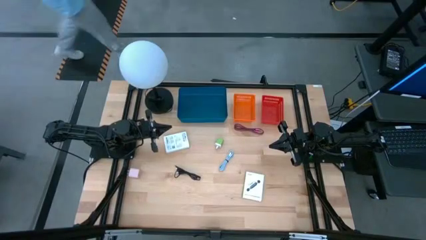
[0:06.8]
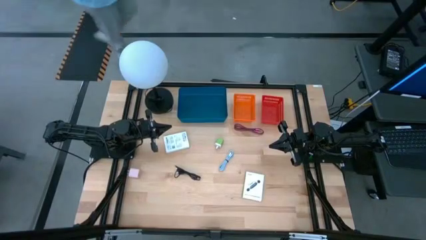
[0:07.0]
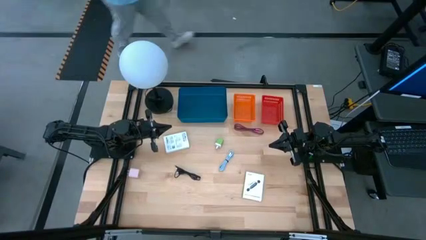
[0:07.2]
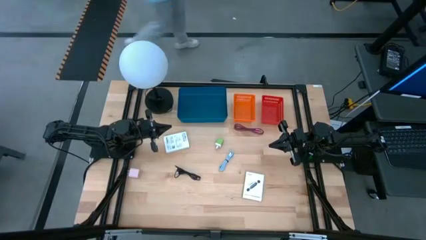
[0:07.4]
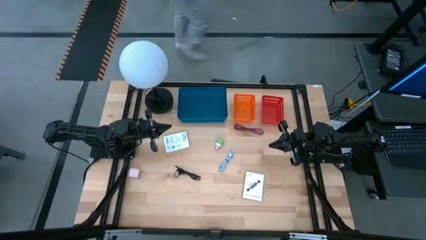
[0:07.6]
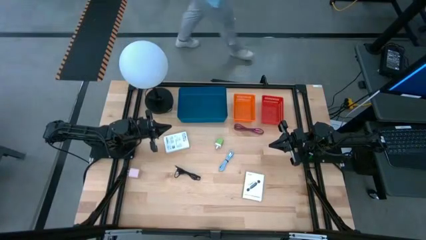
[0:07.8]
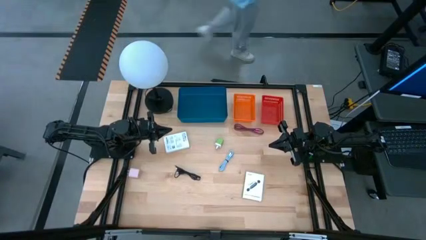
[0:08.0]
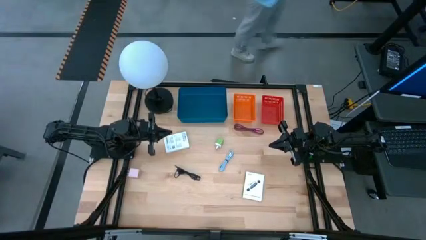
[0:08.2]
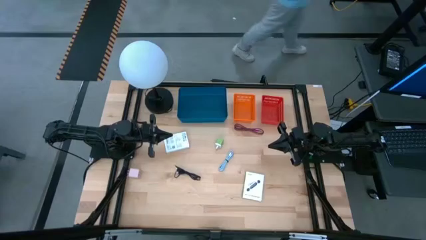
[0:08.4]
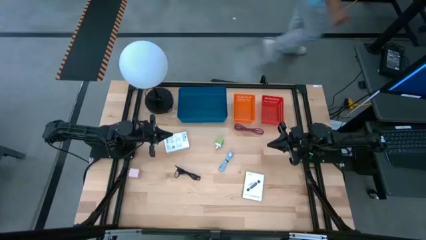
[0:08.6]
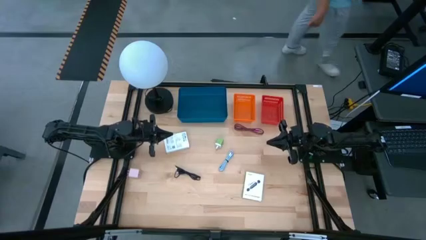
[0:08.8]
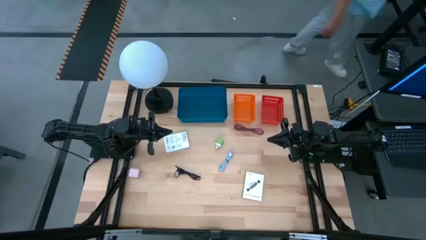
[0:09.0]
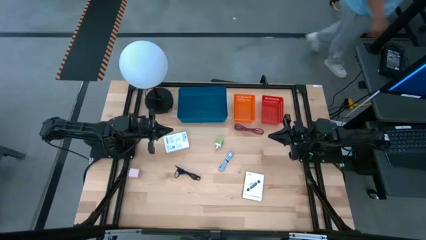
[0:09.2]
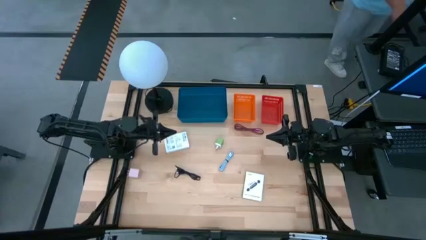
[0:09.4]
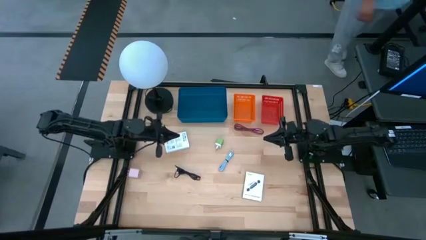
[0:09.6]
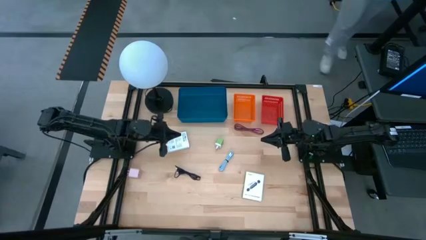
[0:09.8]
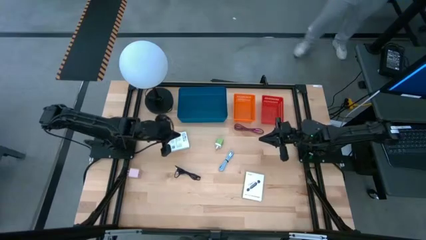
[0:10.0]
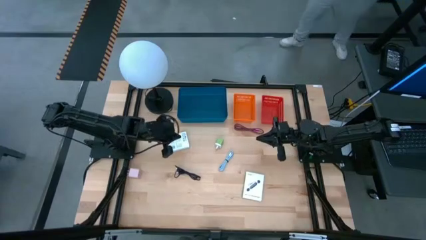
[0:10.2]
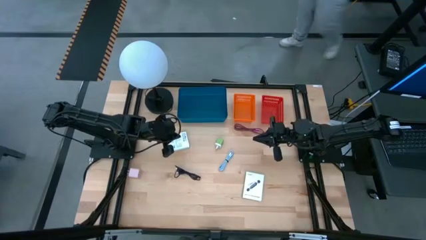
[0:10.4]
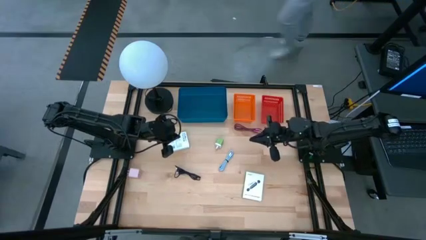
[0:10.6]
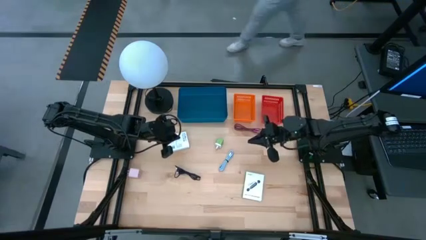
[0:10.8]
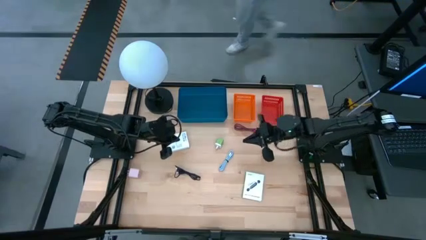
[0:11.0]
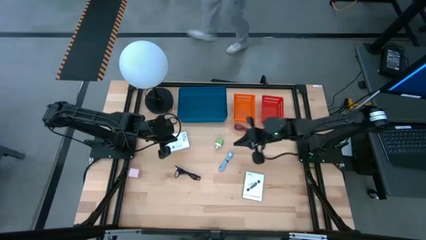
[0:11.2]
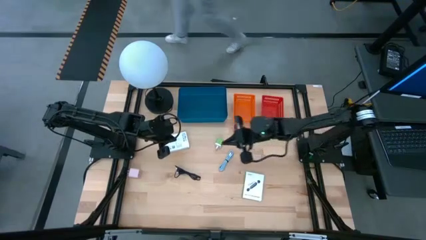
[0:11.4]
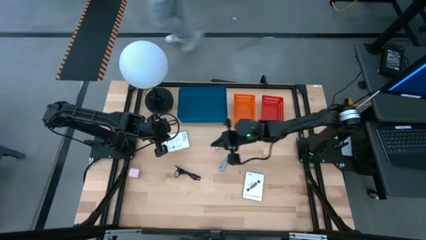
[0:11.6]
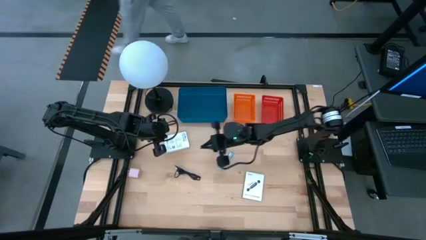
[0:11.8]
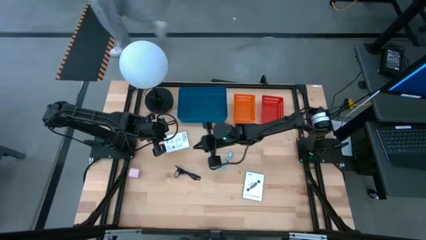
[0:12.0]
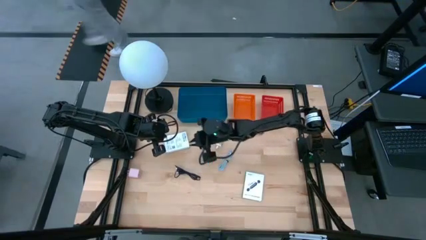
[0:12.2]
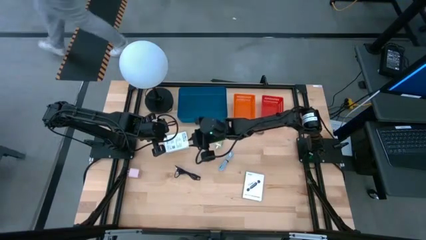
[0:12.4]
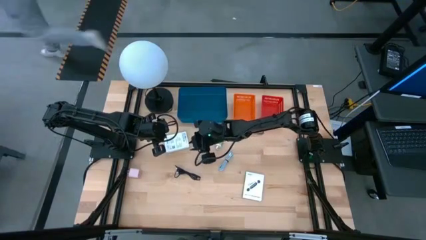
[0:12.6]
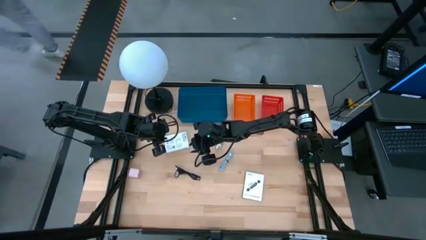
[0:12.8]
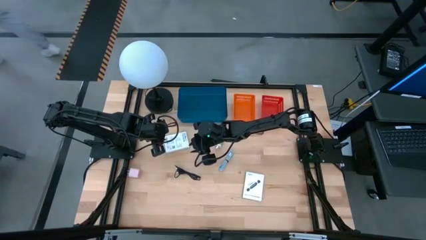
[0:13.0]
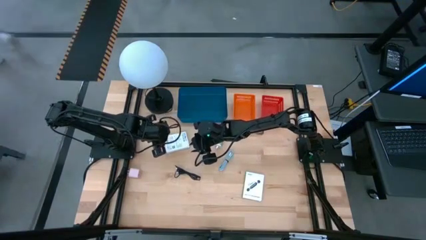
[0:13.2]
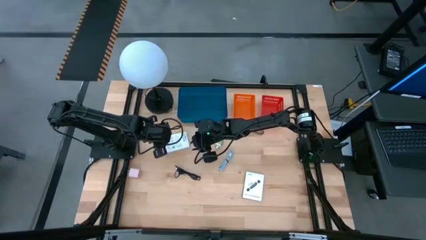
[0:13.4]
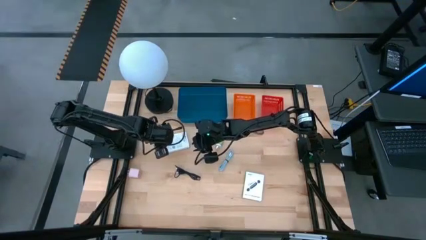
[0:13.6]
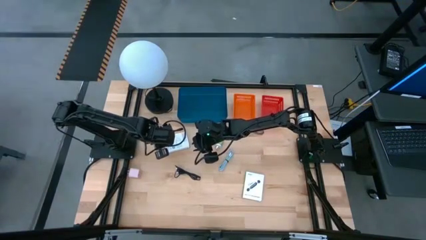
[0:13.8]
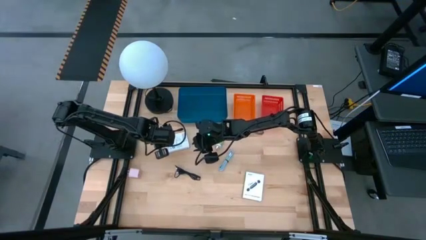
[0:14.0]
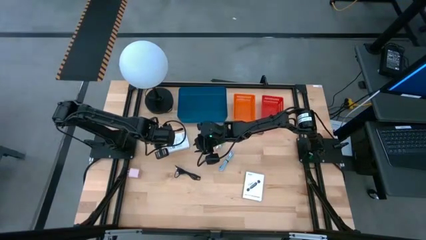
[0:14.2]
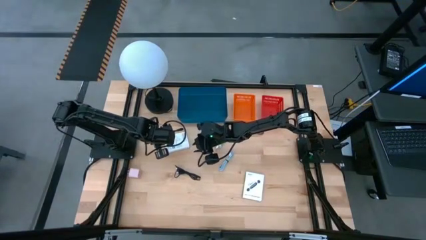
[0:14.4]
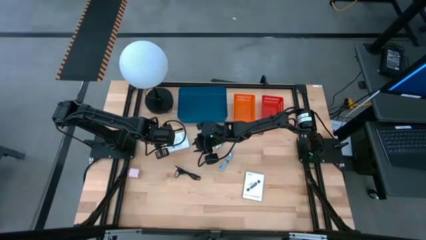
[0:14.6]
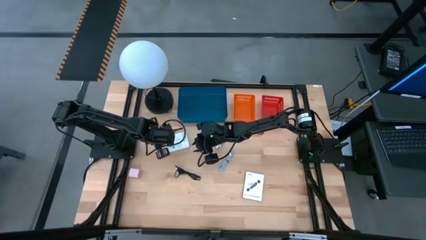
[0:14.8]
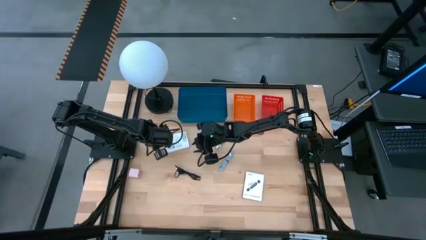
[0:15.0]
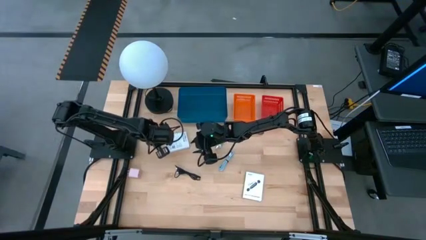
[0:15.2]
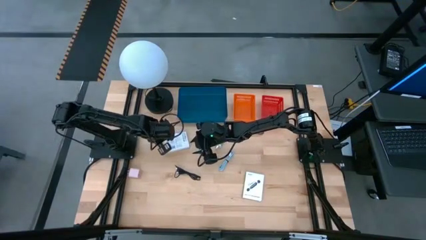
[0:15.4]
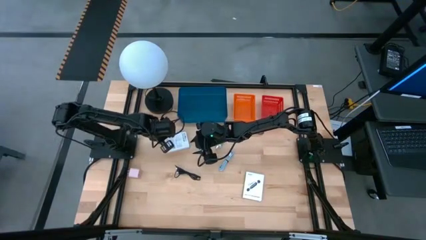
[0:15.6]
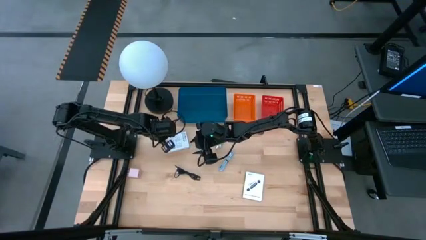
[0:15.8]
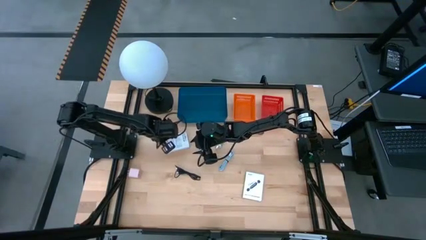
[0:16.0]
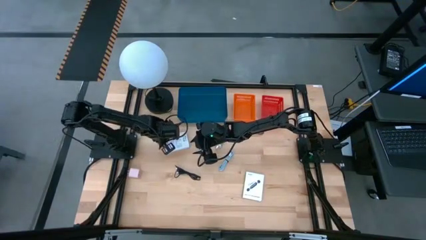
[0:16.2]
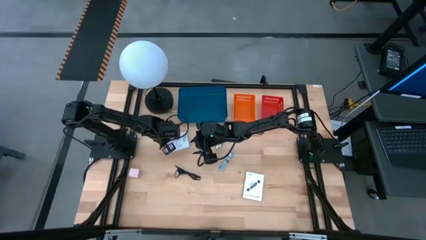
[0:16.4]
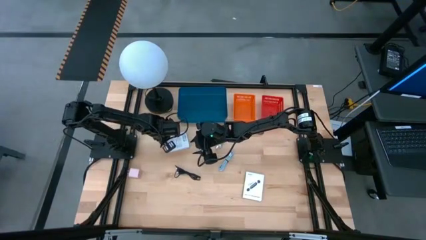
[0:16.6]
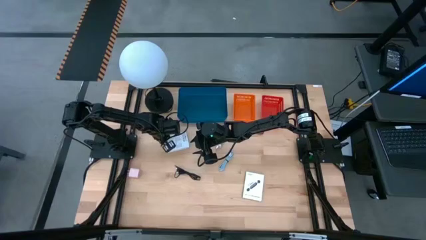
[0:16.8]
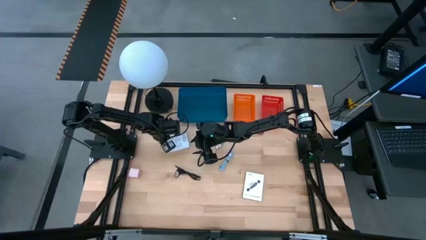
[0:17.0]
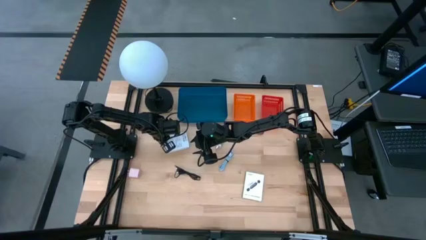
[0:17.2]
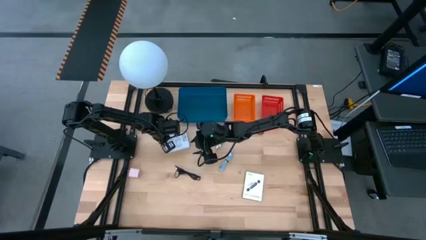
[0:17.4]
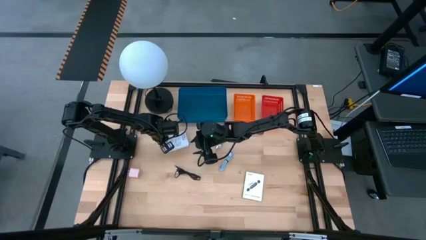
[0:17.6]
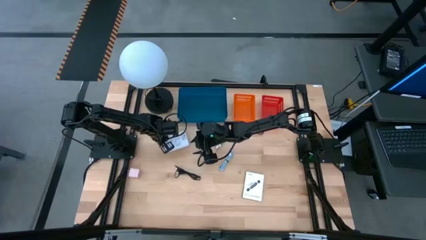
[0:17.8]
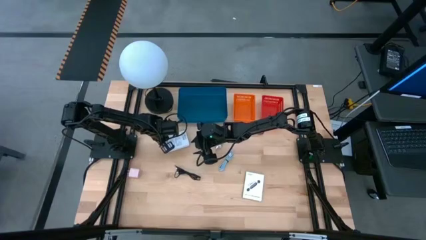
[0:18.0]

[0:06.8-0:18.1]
Task: Pick and place items into bin
Put the left white card reader box into the orange bin

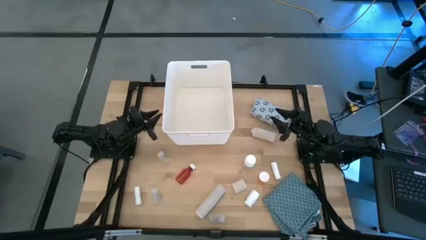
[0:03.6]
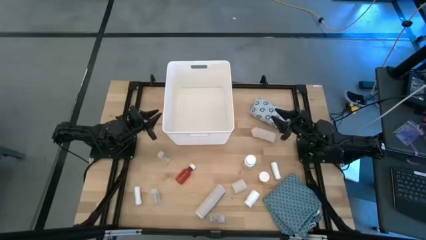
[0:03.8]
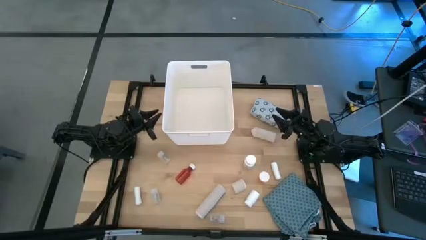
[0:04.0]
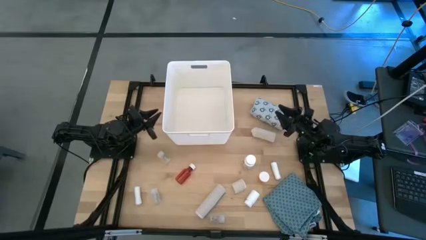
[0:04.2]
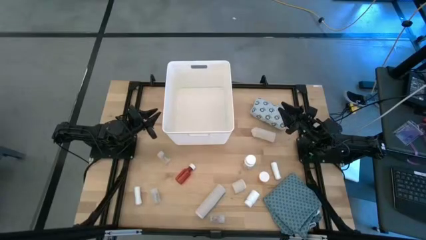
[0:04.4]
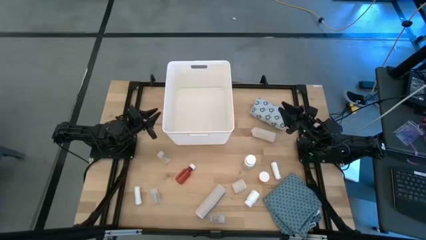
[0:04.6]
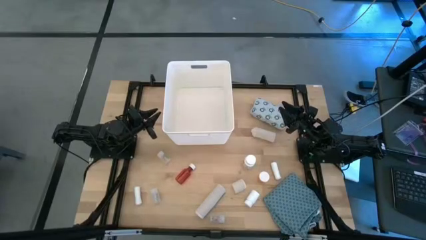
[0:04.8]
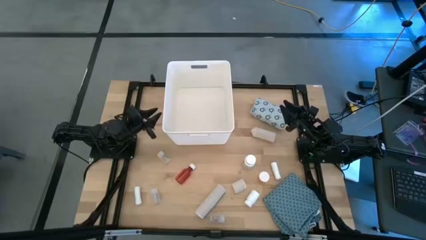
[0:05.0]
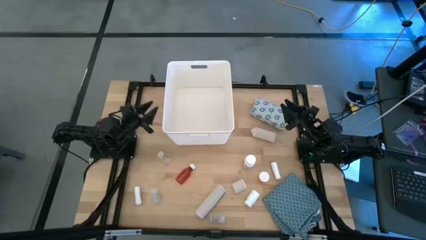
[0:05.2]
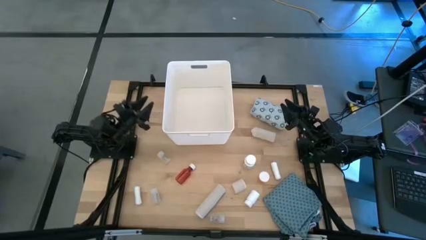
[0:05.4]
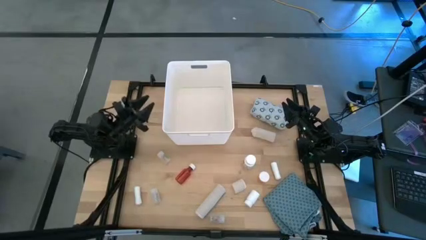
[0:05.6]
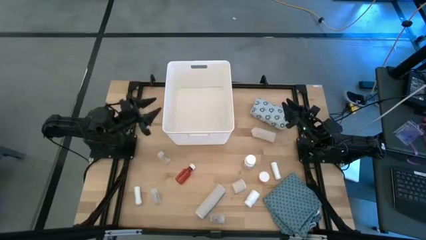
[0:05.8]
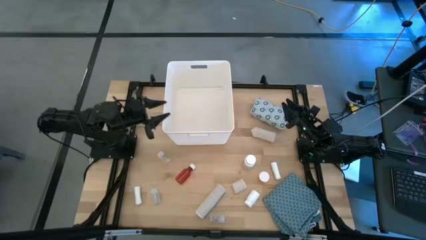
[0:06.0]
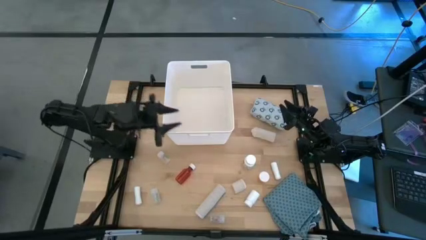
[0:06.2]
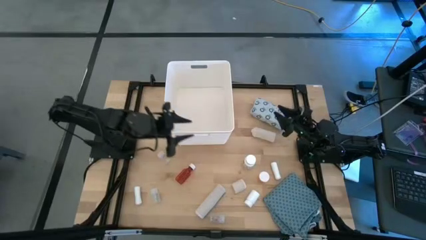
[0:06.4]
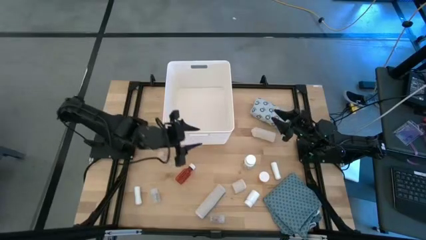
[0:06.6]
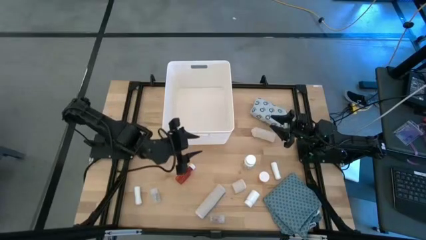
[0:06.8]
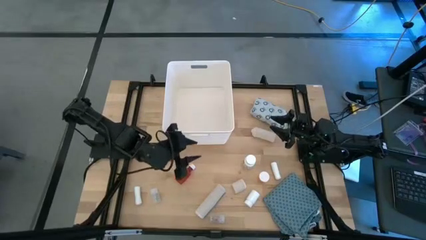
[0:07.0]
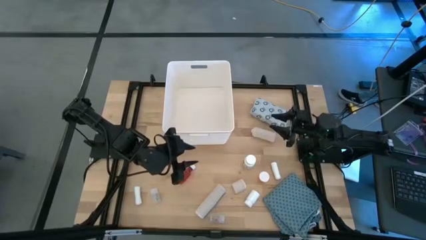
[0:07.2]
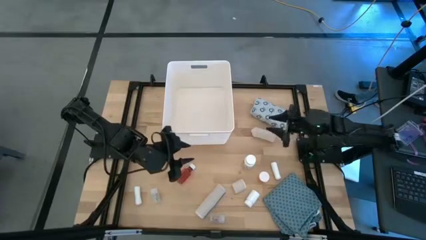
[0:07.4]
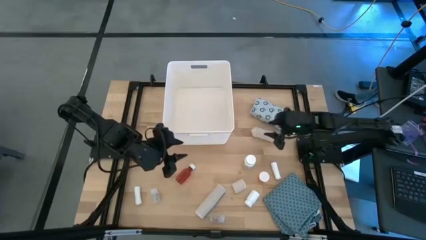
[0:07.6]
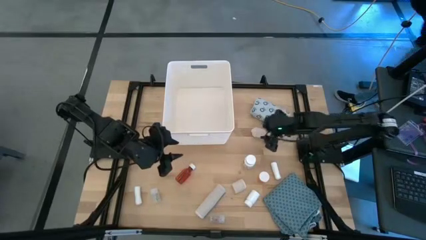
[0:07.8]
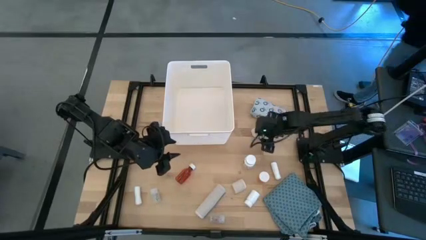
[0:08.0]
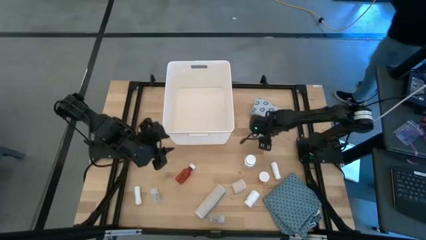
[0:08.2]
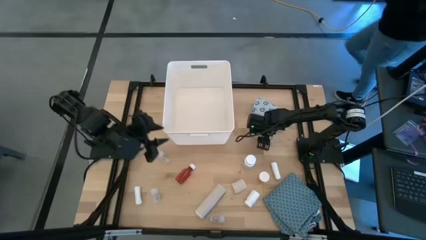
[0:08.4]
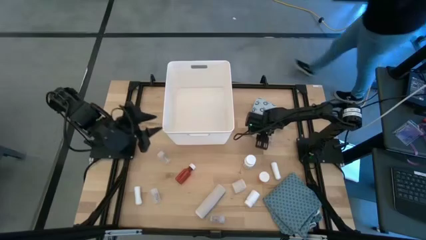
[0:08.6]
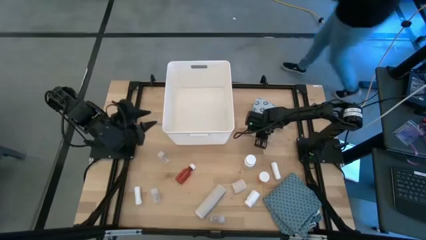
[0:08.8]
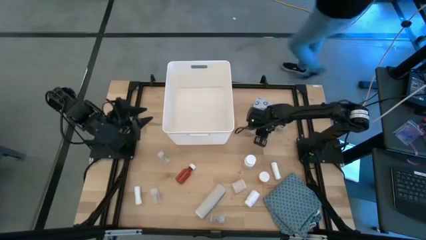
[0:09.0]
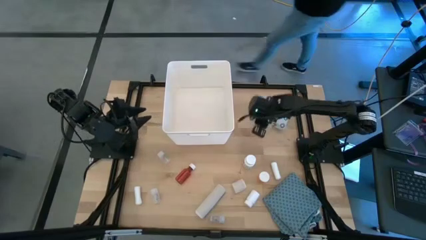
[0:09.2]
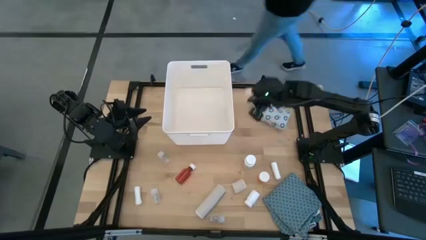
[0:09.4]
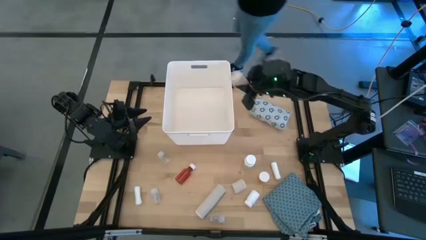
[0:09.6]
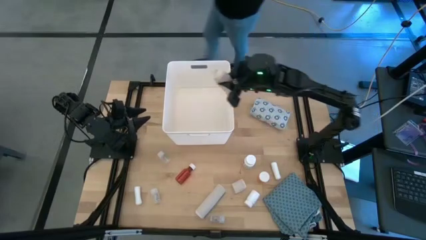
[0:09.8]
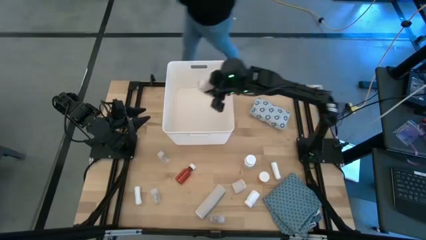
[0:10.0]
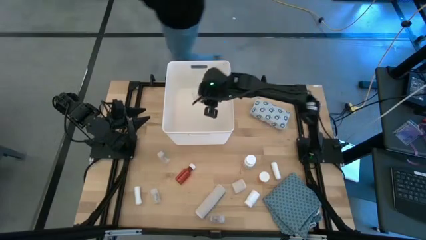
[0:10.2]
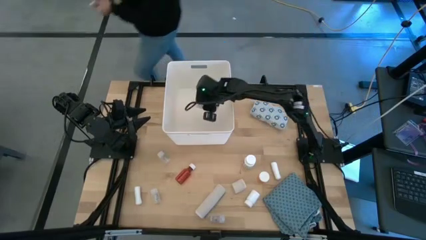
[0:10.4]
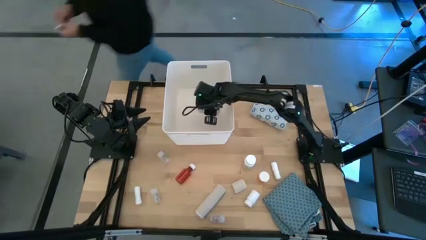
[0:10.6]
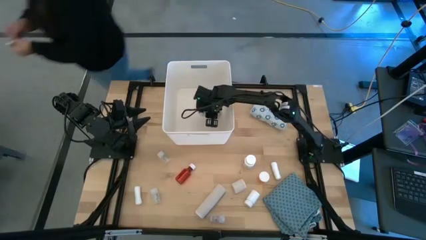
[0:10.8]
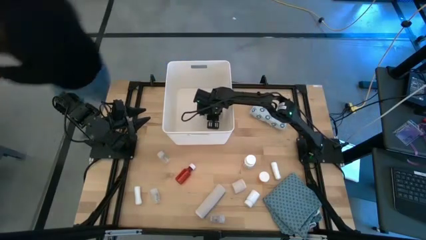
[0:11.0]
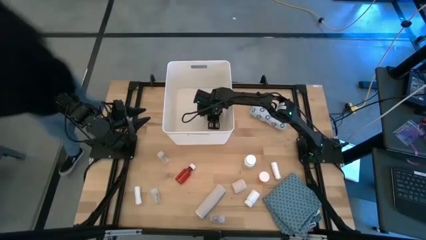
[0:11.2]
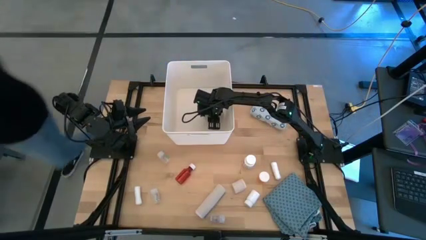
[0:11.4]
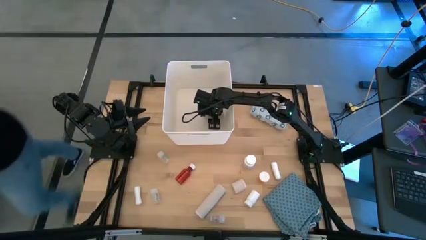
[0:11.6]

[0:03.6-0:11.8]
Task: Pick & place medical supplies in basket/bin
Put the top white bandage into the white bin
